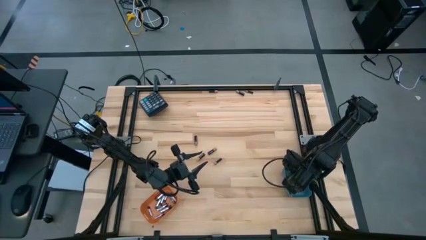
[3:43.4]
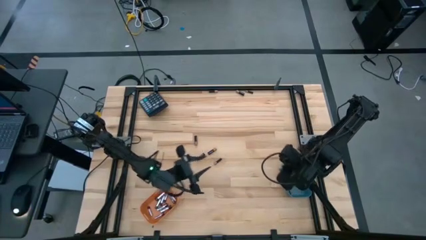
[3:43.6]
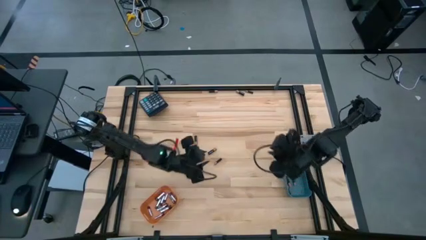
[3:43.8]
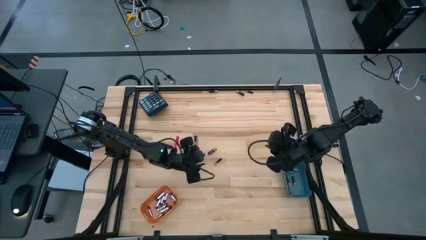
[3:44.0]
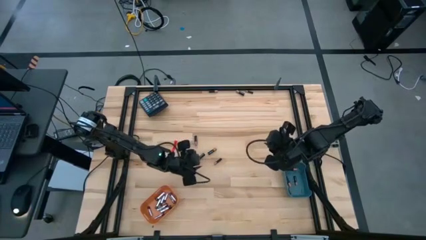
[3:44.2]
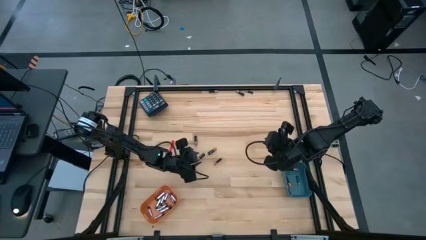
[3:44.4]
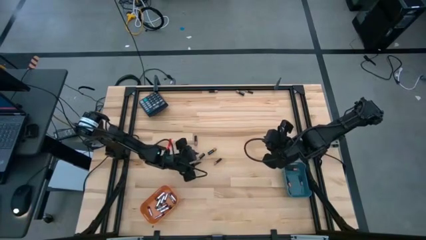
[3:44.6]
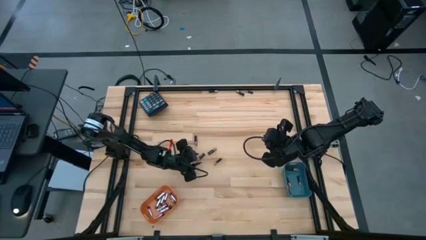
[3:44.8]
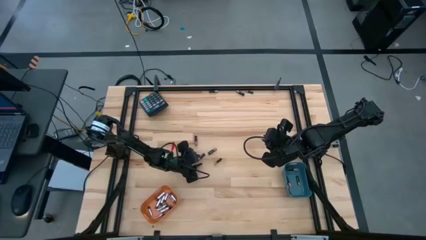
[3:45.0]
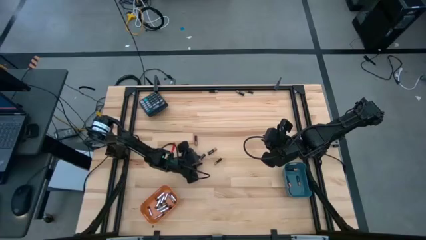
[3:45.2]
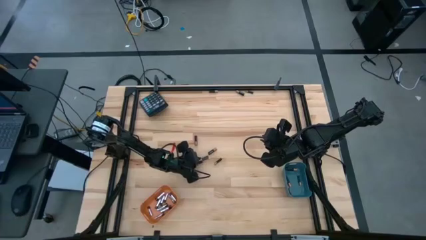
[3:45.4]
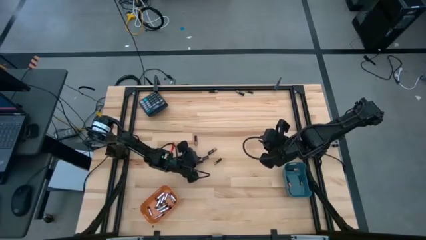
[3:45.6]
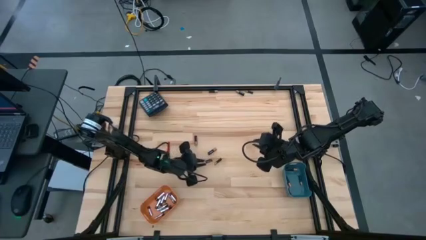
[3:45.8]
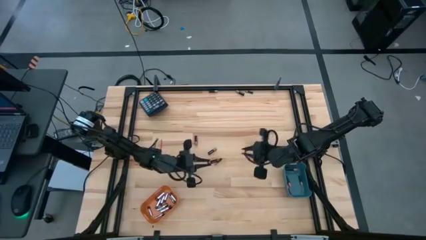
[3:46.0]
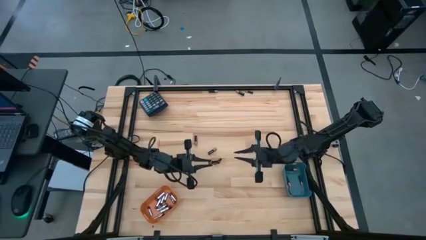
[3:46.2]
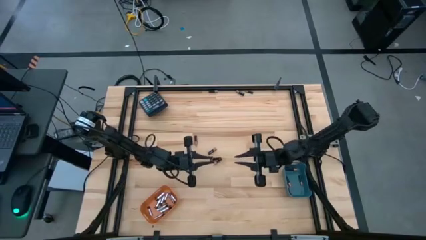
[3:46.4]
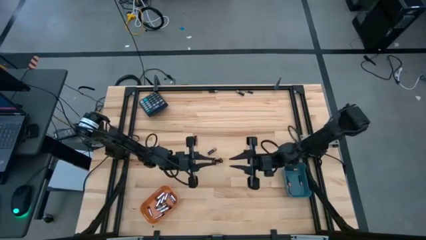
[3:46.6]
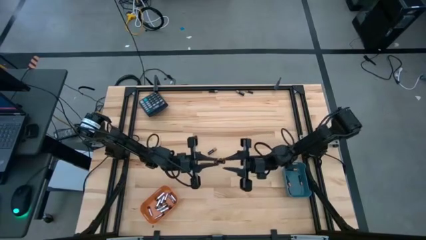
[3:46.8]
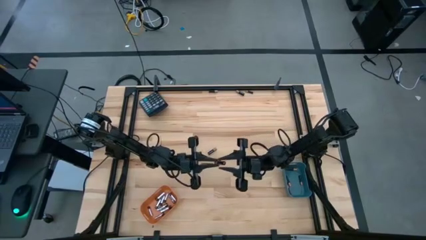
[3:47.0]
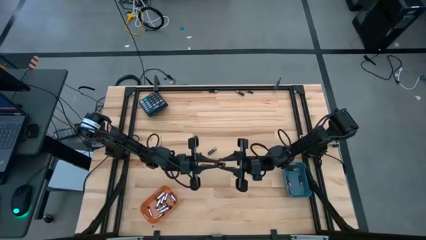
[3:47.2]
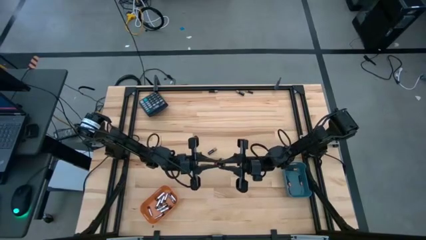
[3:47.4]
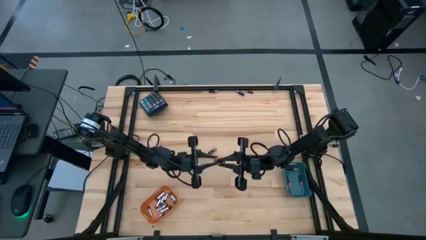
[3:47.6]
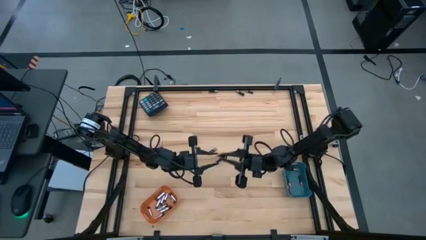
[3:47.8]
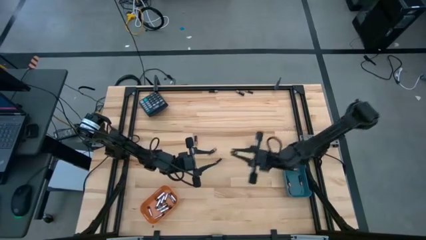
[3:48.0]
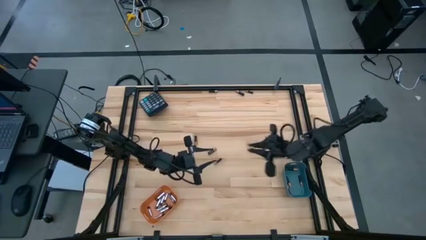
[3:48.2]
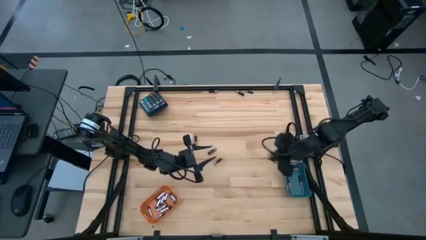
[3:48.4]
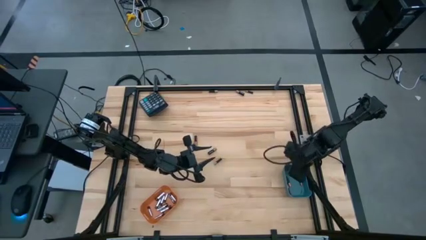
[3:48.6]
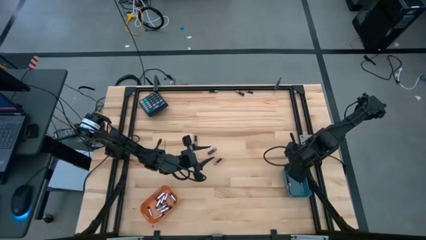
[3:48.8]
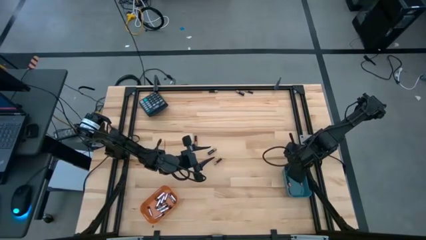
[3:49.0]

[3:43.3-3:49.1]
Task: Sort batteries
Put the black battery into the blue bin

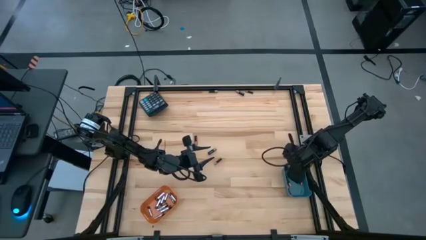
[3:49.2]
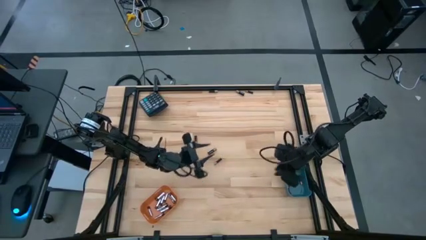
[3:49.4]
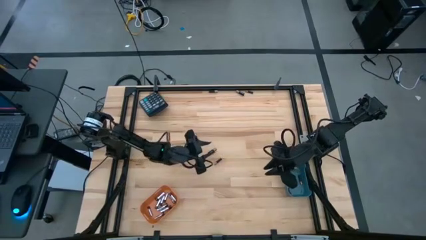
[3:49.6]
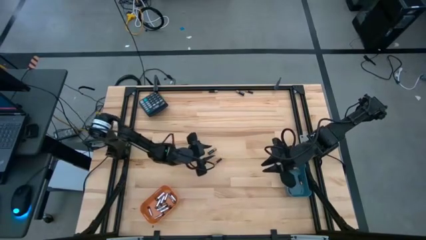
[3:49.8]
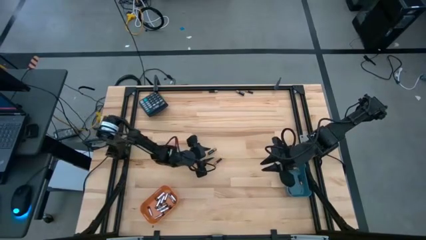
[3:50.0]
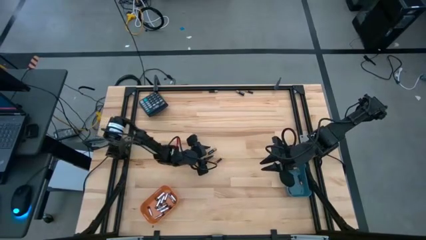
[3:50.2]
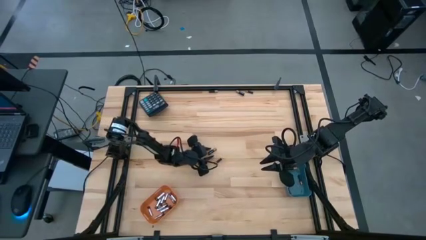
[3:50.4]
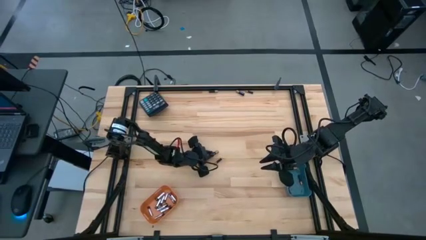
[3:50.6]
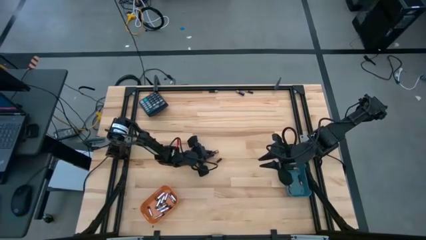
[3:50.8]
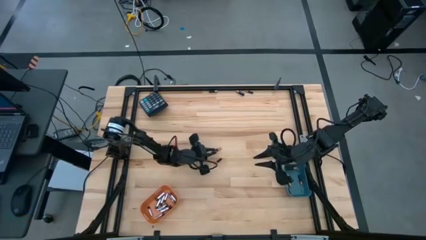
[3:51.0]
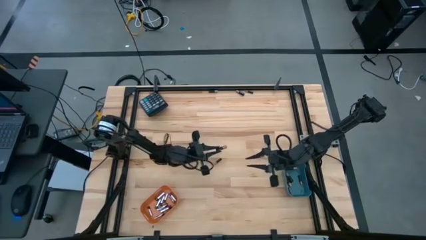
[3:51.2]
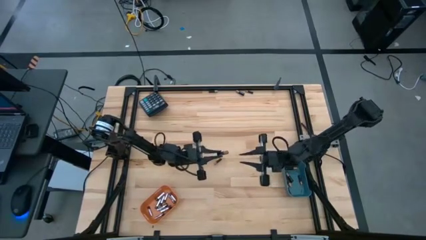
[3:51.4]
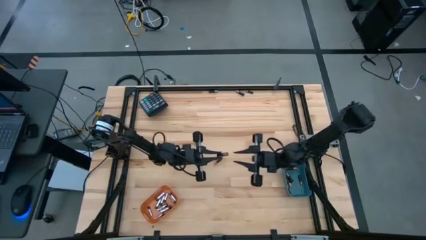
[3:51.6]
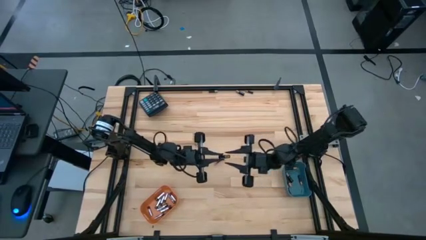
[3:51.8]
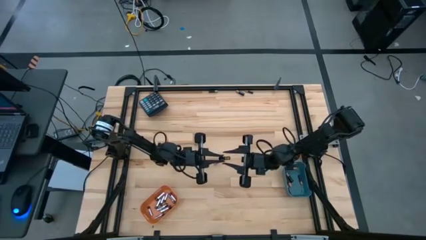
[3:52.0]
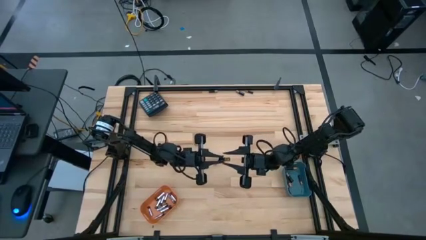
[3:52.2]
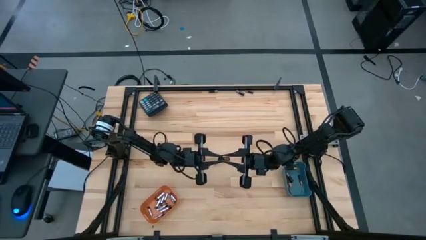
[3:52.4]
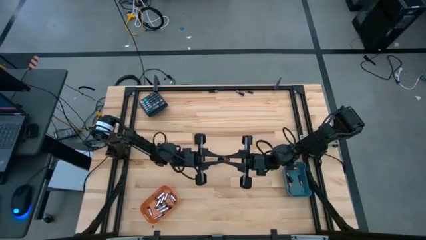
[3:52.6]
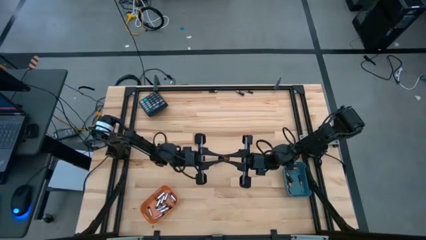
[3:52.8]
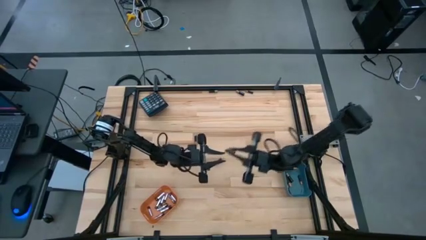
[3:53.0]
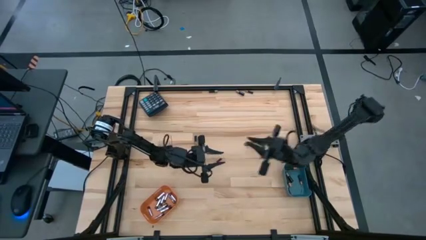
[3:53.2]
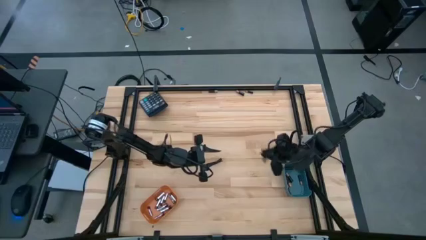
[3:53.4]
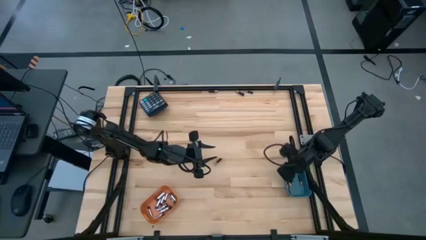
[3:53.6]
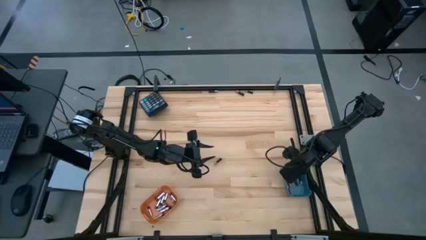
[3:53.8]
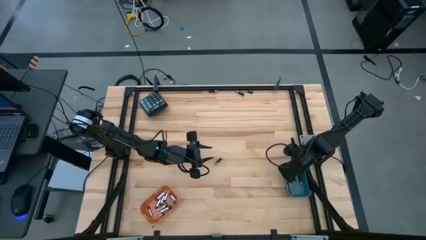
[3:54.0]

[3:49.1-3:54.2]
Put the black battery into the blue bin

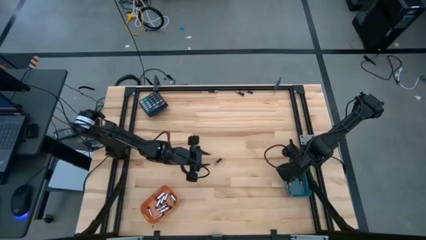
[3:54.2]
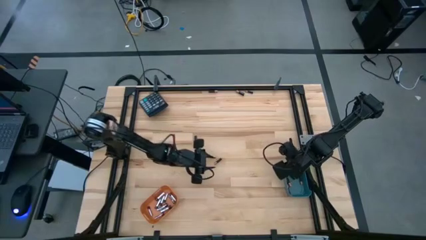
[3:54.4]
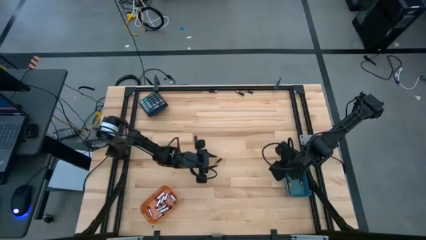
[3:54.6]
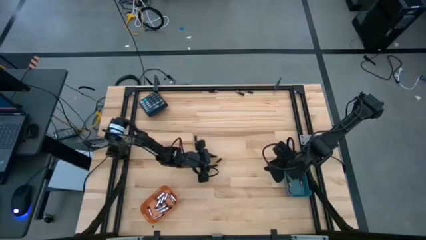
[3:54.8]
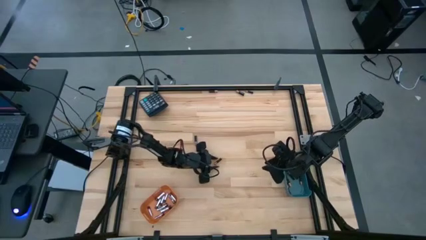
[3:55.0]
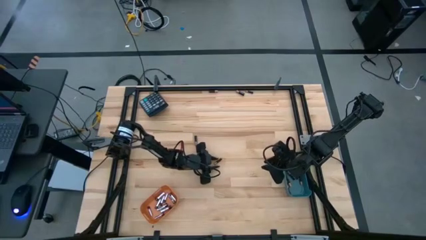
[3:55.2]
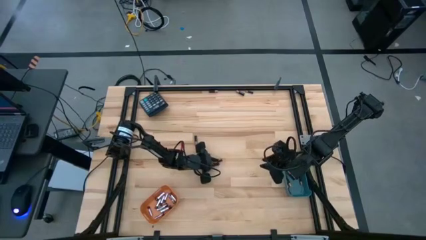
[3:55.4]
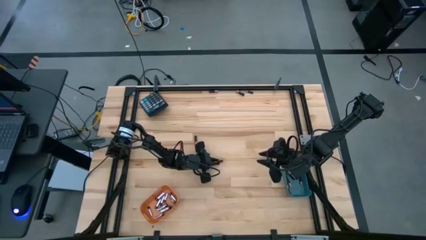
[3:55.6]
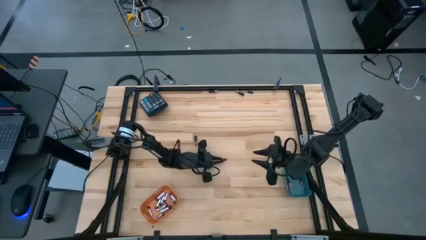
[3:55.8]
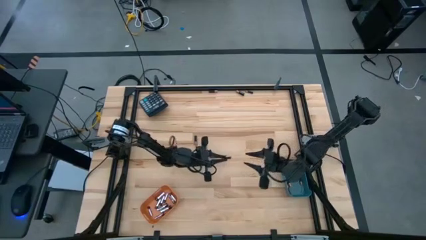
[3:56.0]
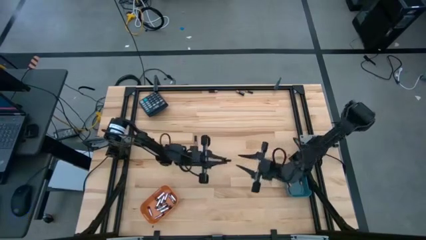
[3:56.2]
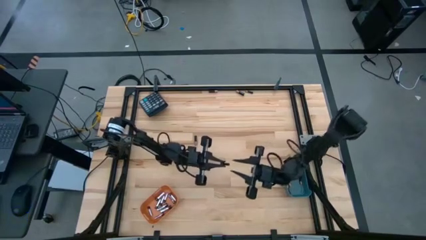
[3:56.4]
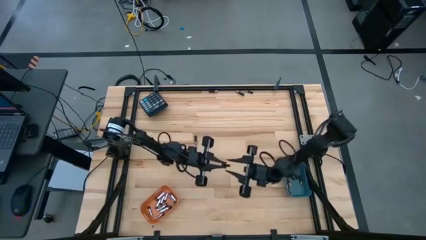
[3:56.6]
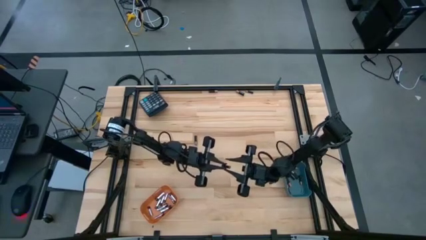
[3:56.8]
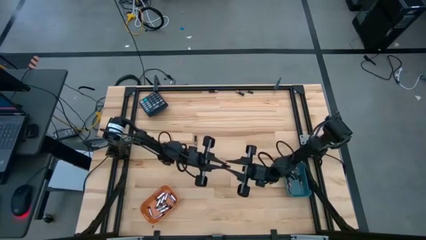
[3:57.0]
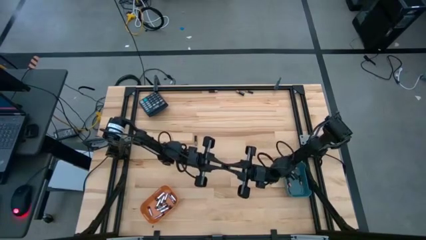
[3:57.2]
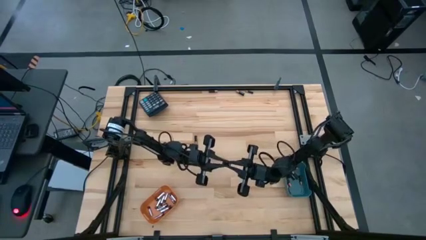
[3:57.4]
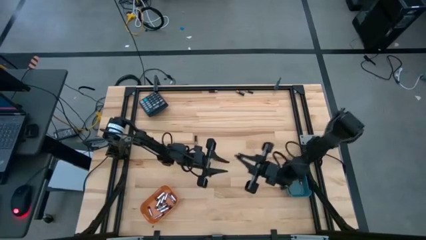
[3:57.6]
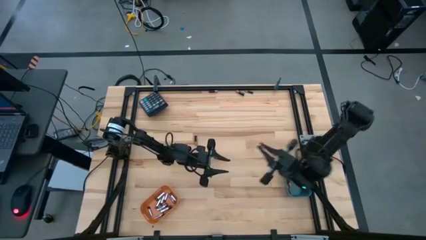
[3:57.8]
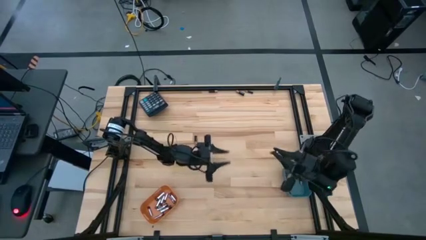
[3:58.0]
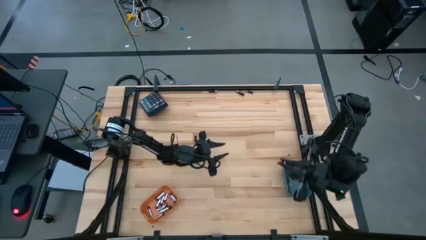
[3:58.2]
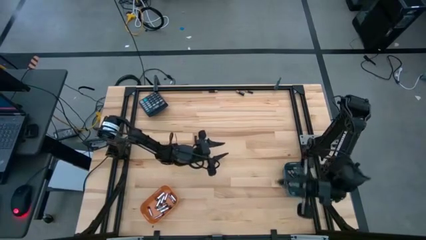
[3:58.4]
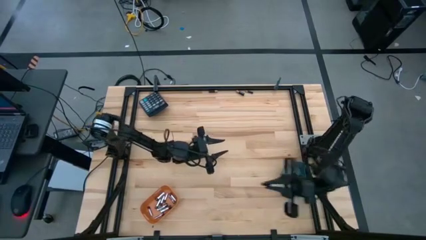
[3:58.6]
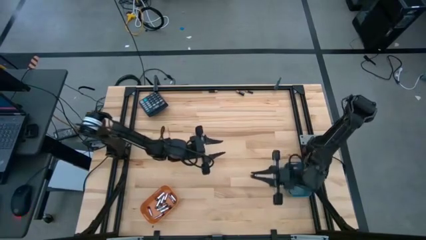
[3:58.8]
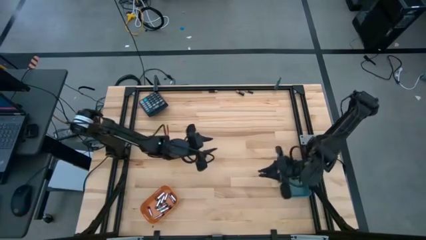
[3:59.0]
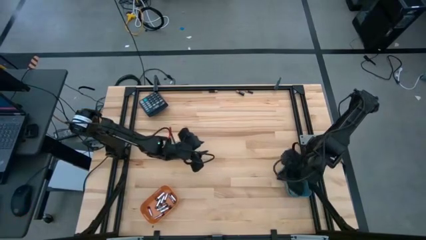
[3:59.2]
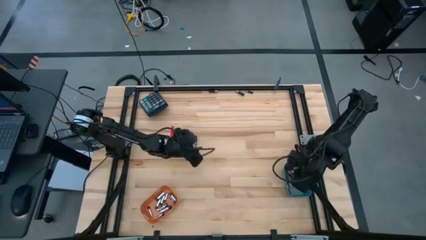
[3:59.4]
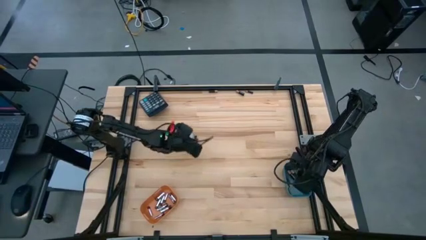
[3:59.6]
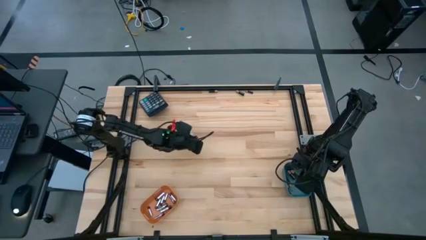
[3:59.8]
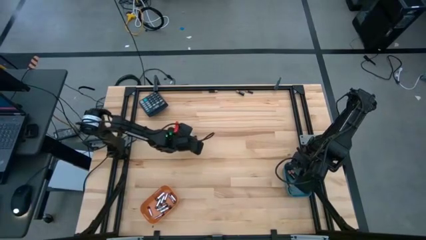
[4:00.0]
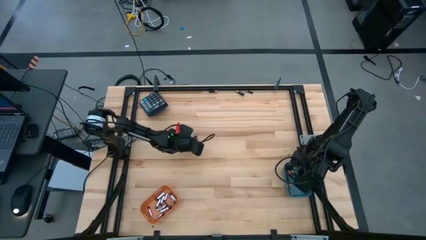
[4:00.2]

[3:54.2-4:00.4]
Put the black battery into the blue bin

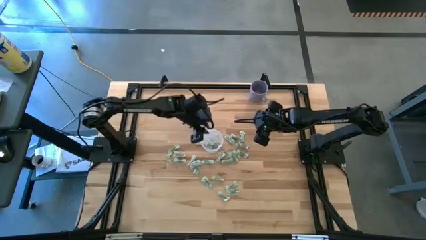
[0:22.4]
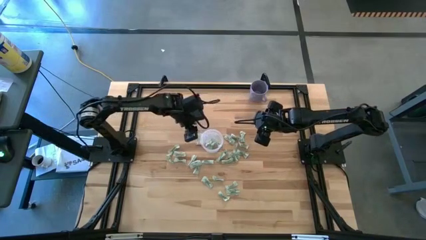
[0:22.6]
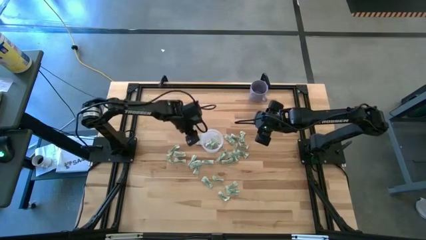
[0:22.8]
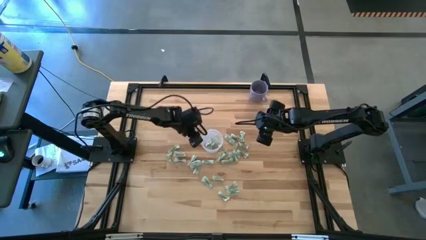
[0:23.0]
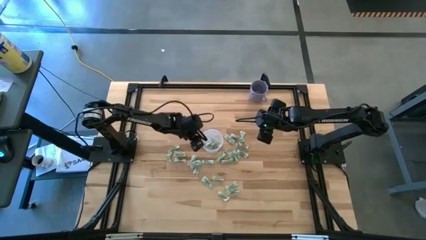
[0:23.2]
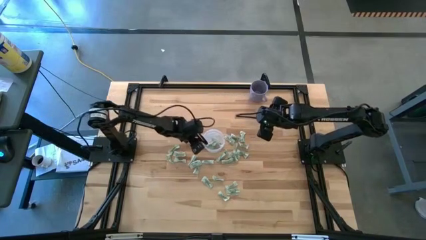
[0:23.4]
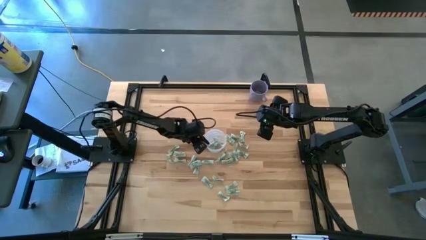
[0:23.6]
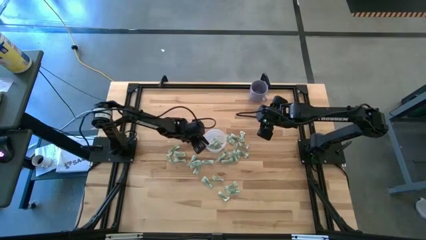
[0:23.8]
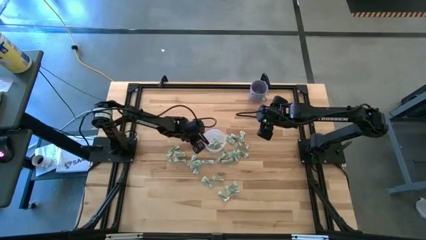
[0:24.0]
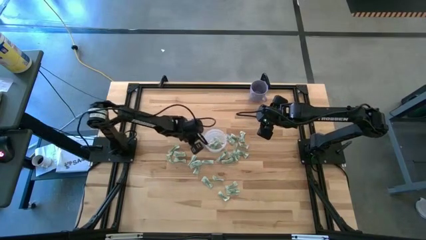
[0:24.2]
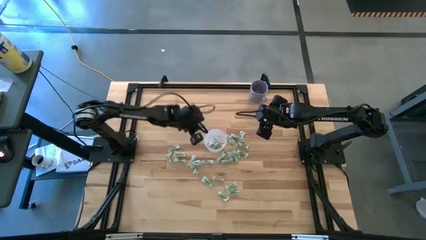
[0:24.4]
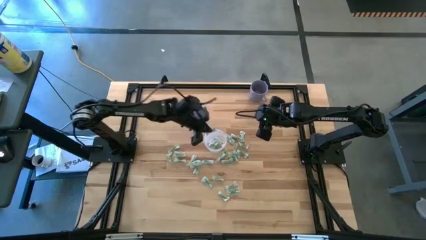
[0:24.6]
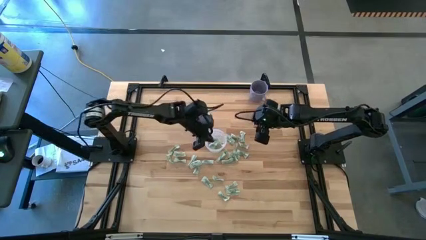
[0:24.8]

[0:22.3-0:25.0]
Task: Pick and place Stevia / Truvia into bins
Put the white stevia packet into the transparent container
